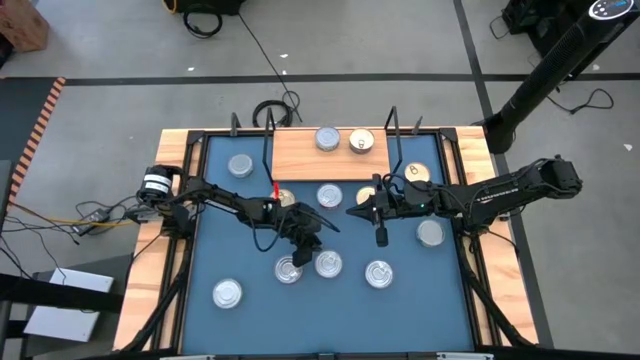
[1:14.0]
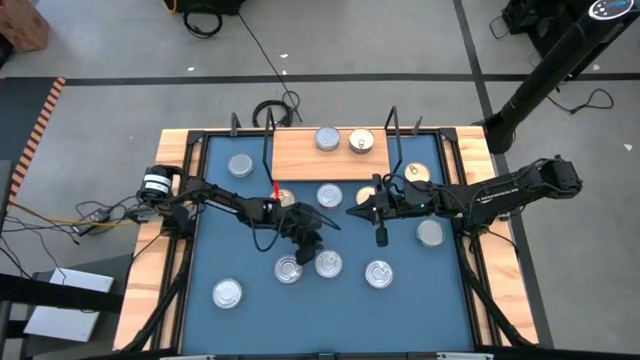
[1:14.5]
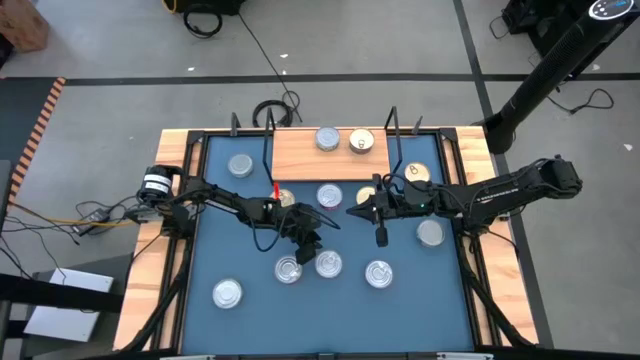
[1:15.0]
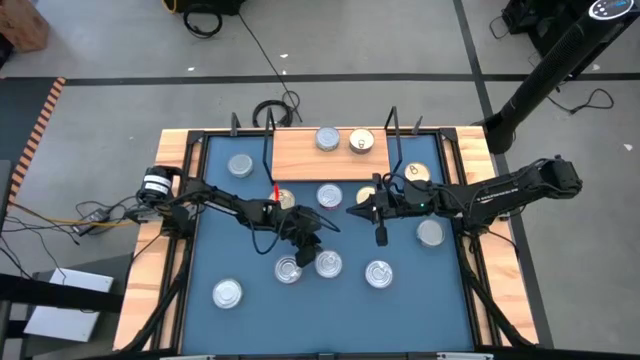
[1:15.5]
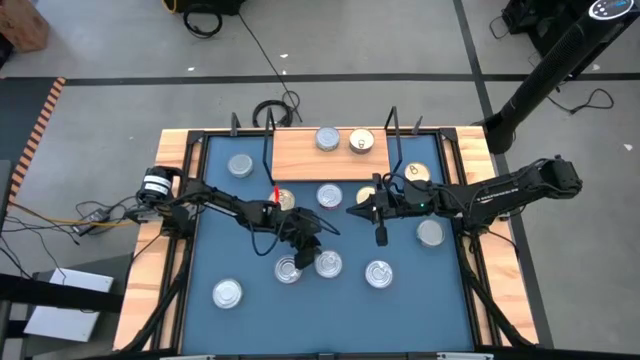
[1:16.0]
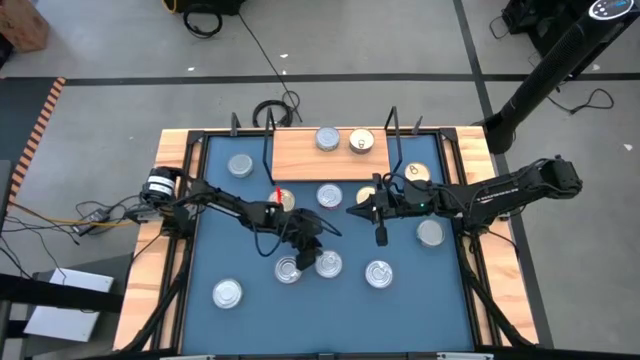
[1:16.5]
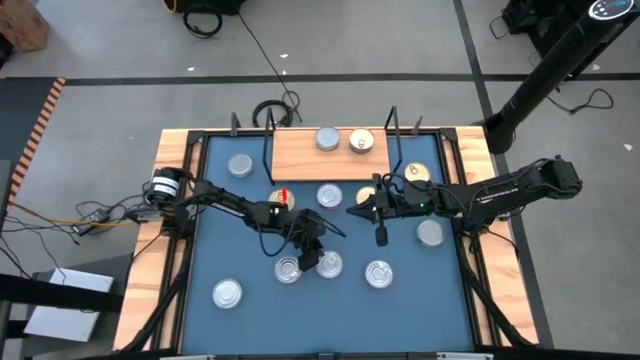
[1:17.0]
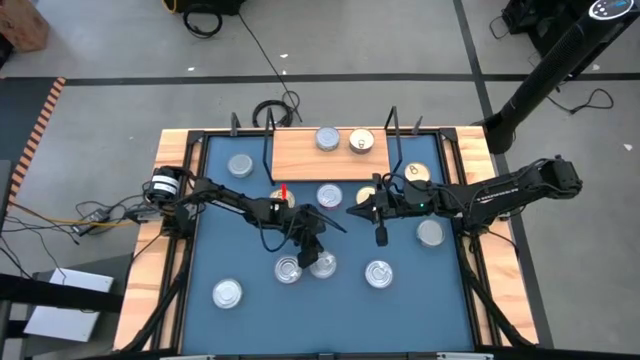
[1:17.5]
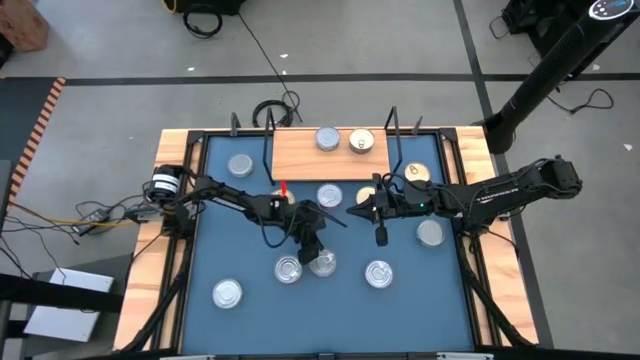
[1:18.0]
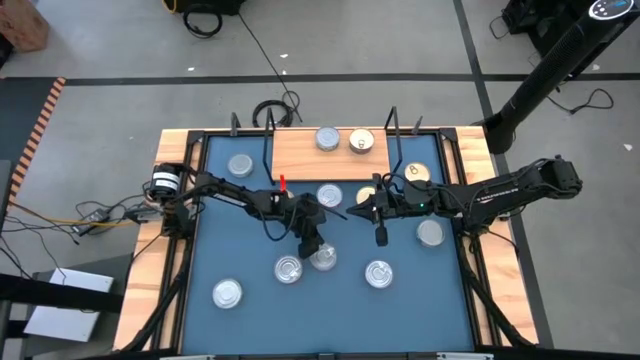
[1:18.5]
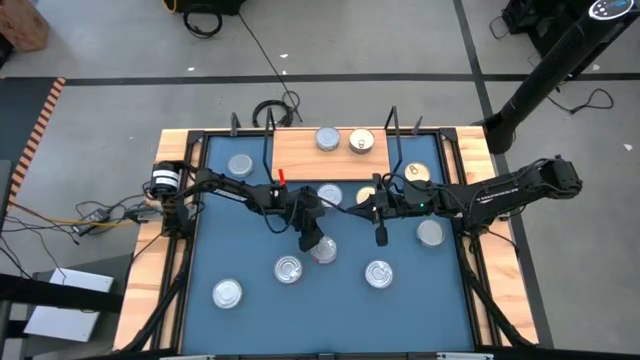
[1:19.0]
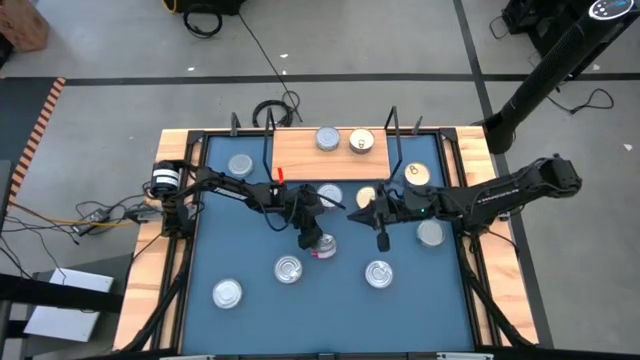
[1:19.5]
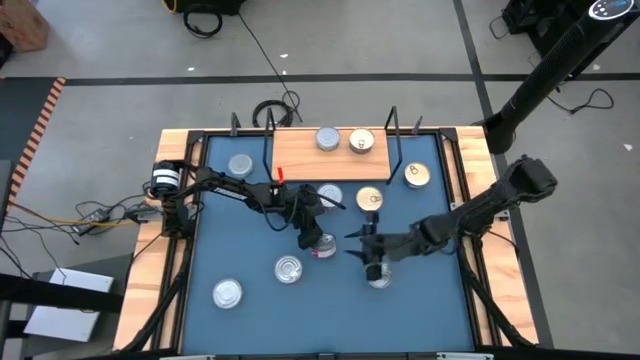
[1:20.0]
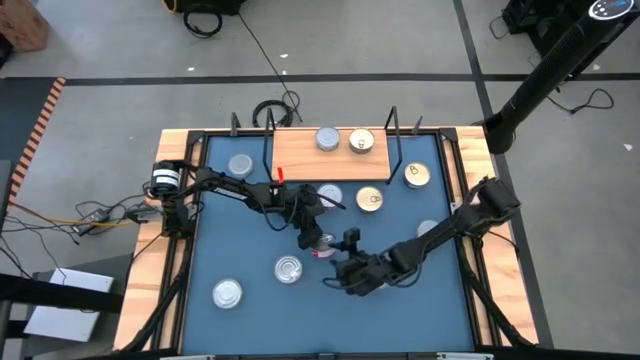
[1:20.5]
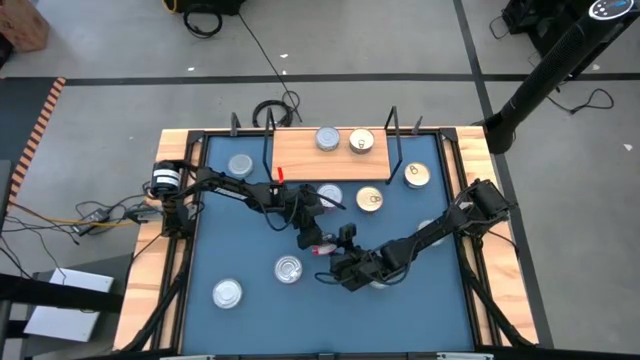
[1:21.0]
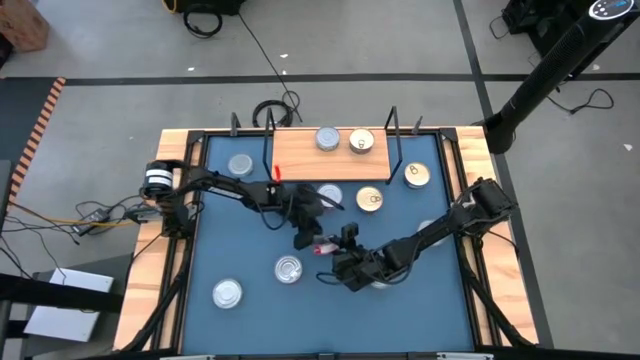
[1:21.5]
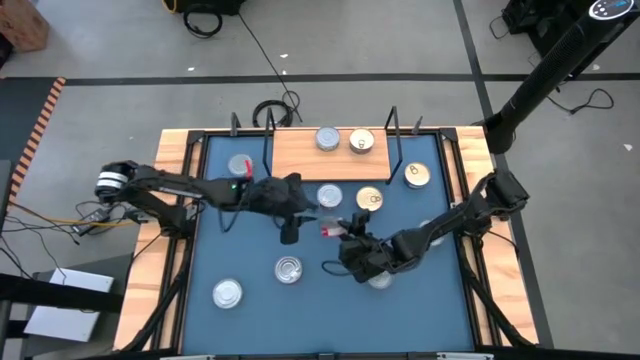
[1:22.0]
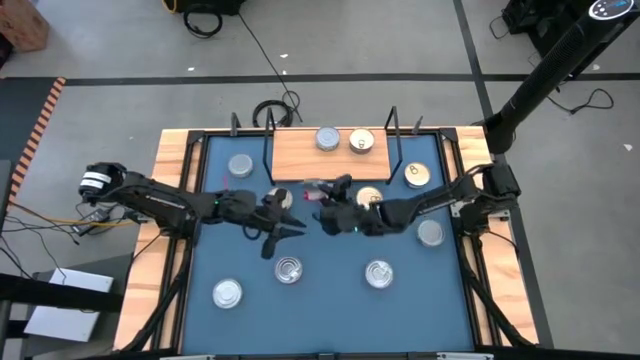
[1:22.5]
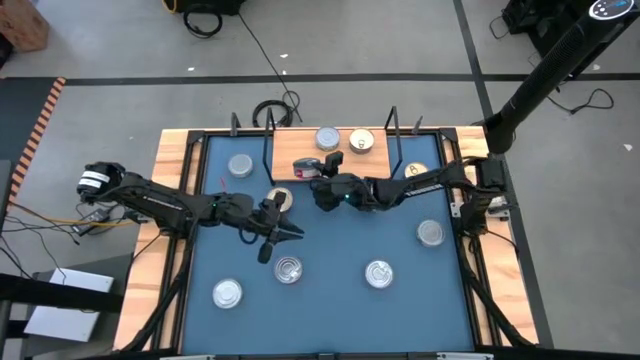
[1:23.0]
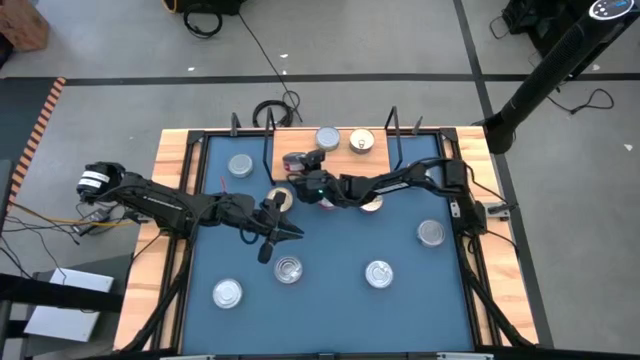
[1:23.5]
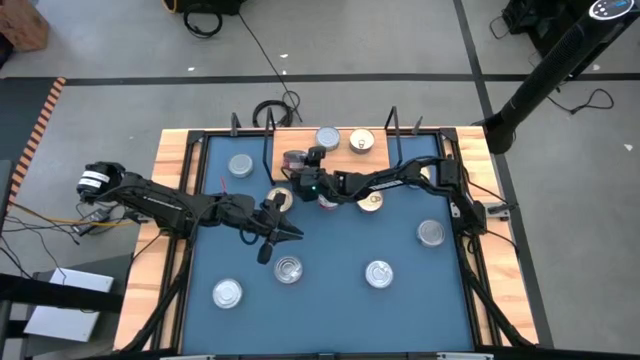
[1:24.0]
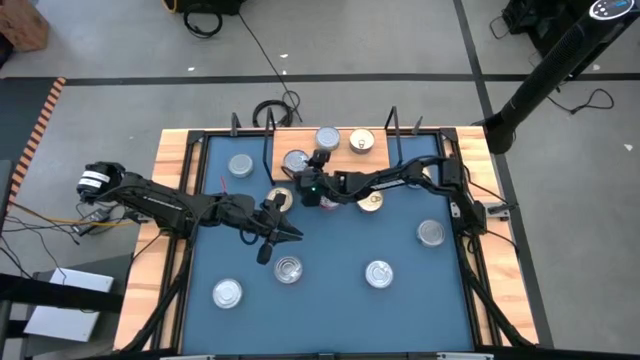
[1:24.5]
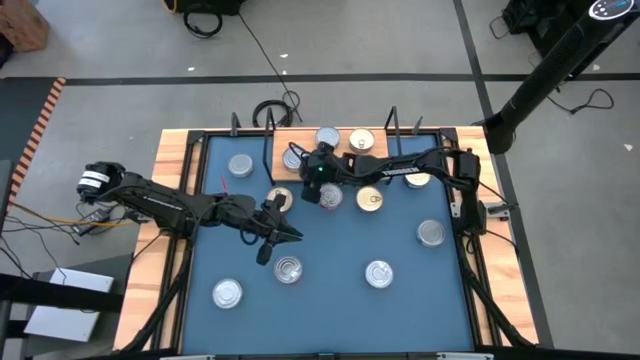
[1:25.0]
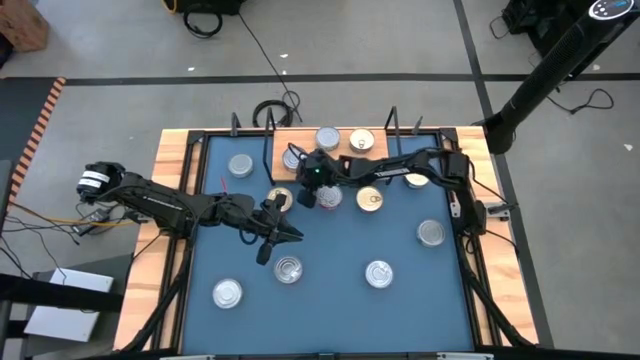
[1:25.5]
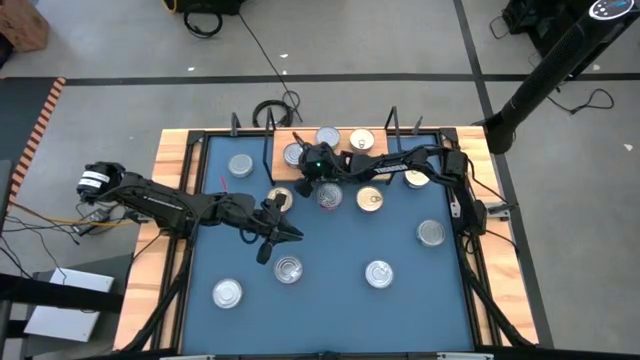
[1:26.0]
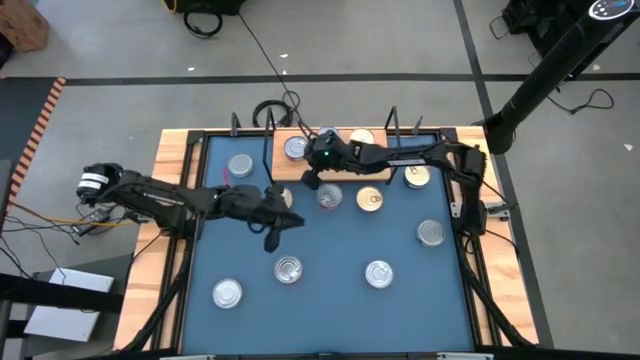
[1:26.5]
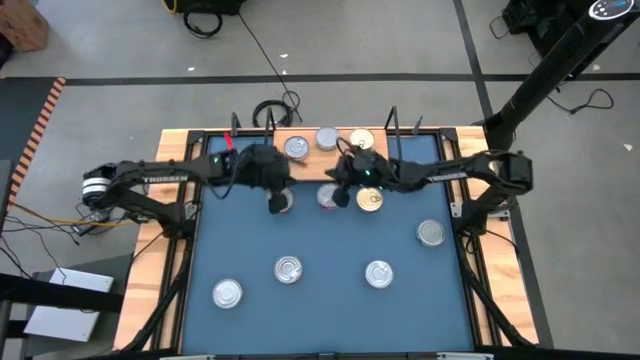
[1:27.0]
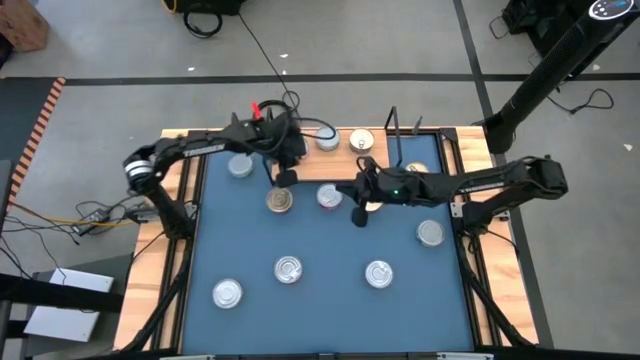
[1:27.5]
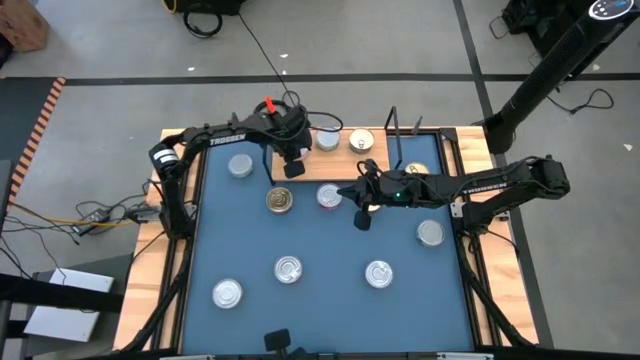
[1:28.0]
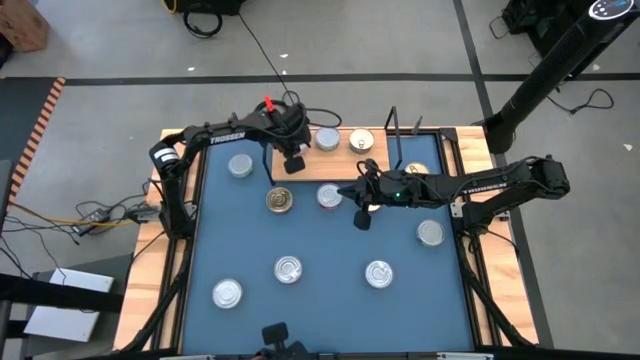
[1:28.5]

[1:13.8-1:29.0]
Task: Stack canned seafood by type on shelf
Put the red tuna can on the shelf
